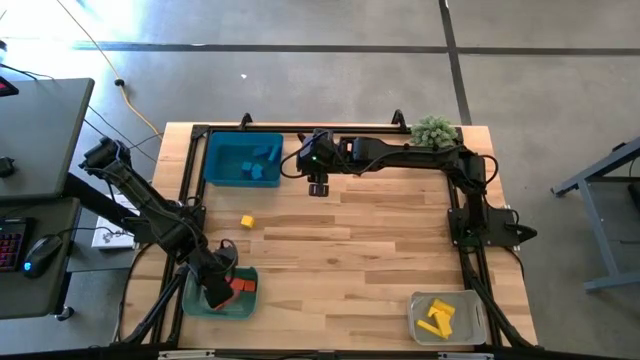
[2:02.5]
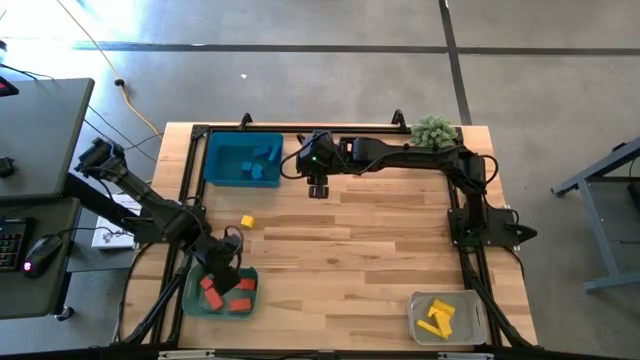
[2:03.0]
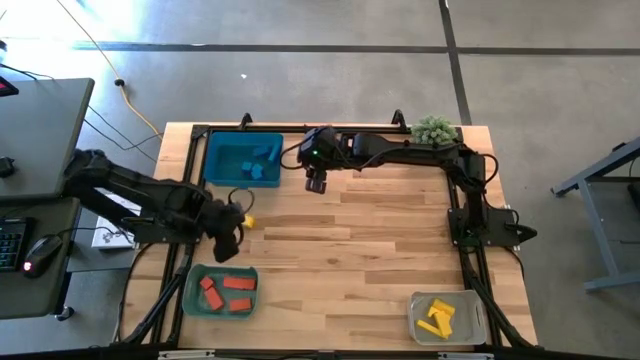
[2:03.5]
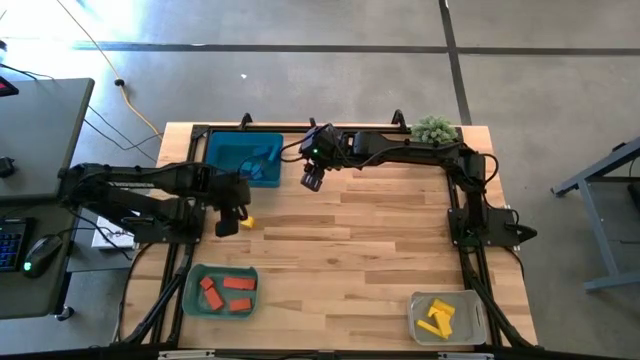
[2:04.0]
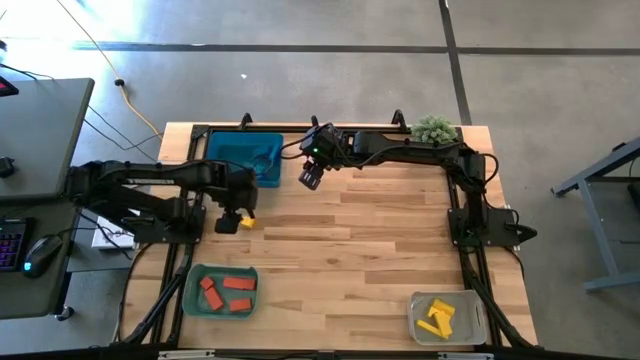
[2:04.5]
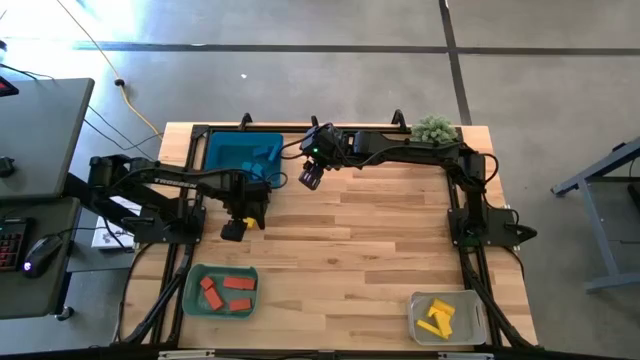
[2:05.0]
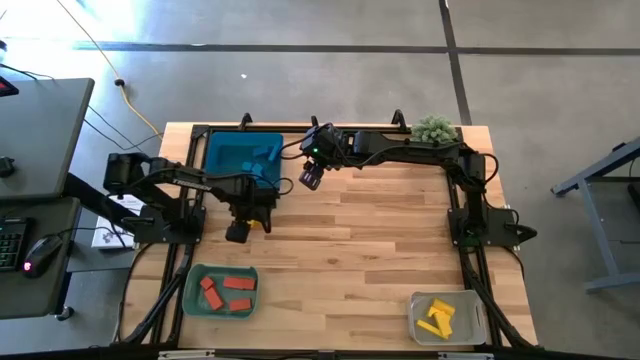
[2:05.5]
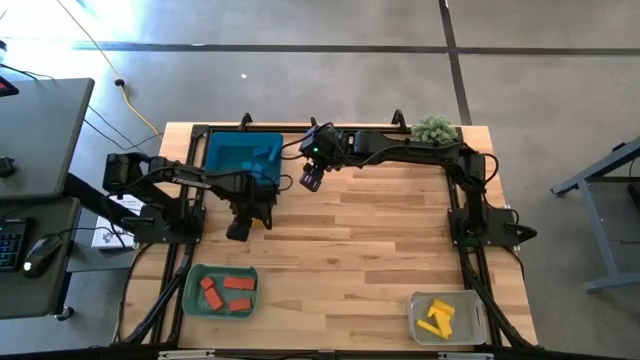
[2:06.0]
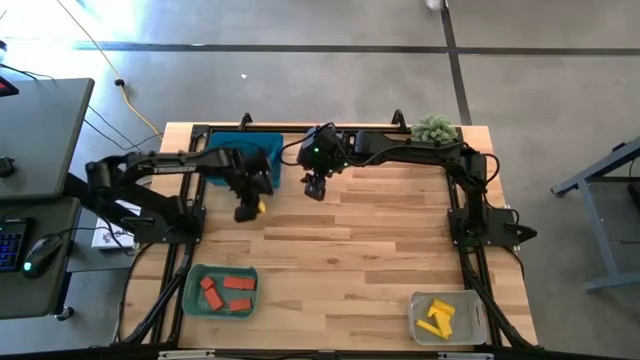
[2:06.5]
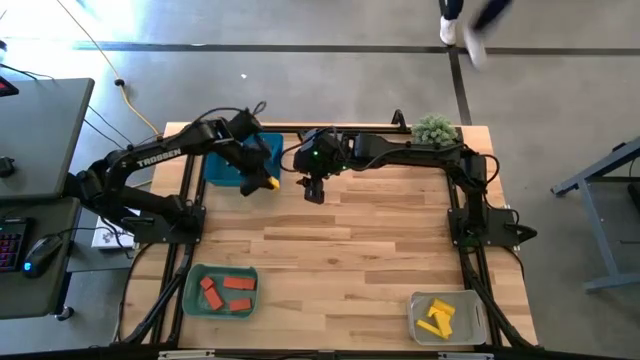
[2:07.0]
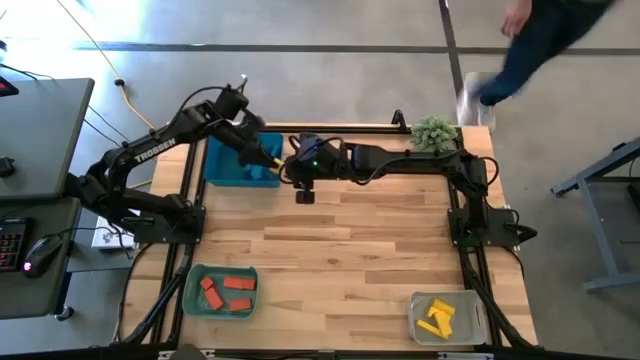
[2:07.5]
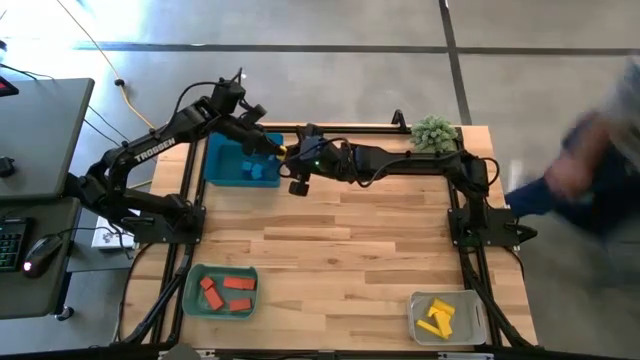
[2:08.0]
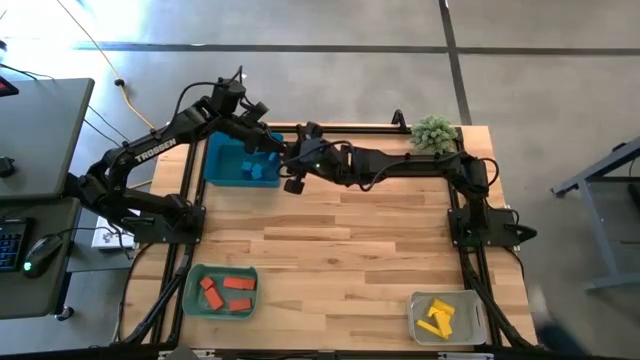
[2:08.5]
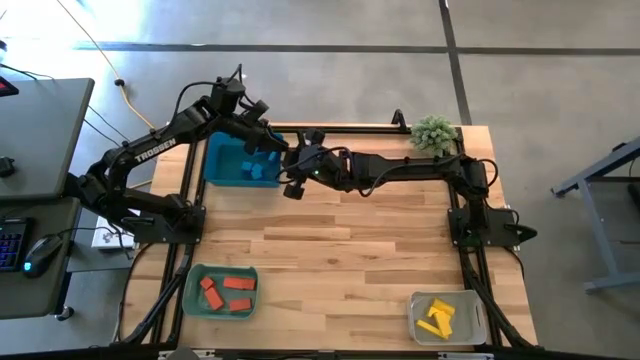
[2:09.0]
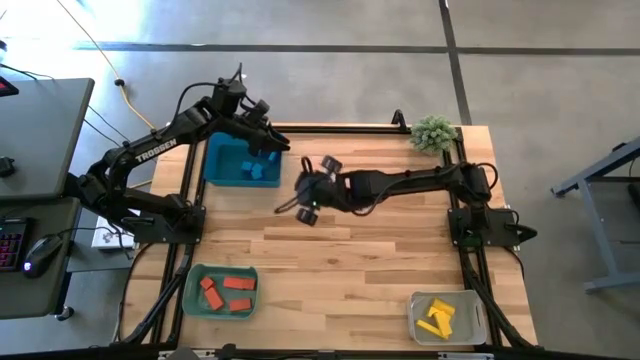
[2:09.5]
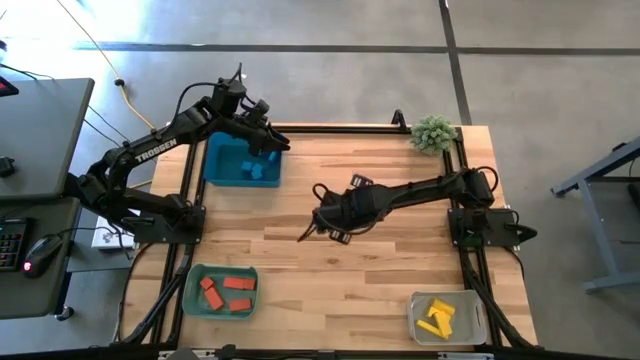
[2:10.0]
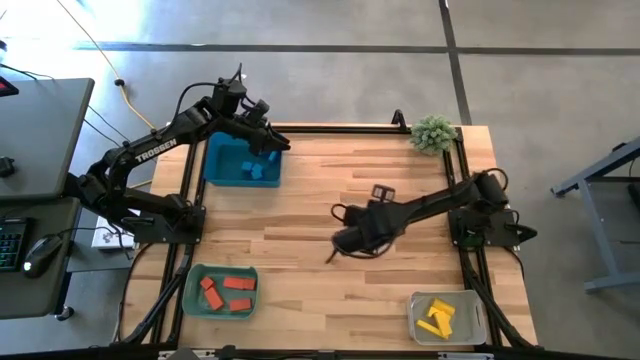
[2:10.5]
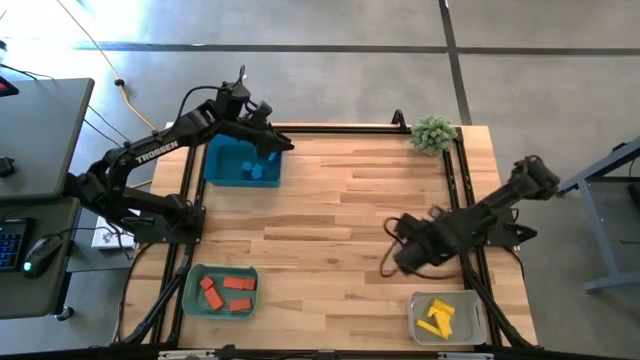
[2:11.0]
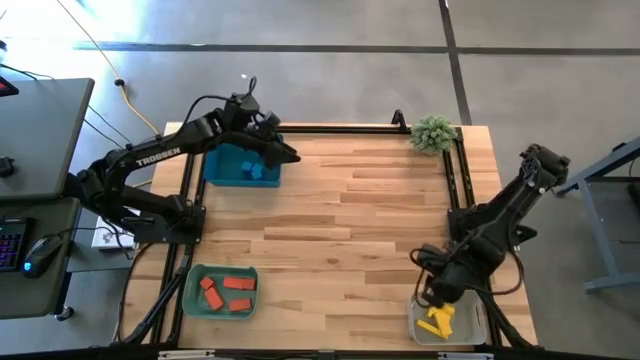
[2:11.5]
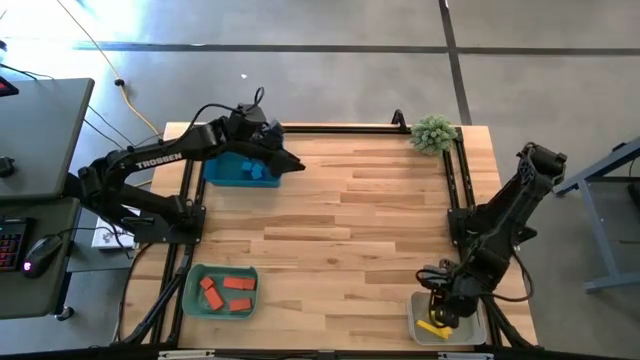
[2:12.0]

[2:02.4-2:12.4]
Task: Sort & place blocks by color
Put the yellow block into the gray bin

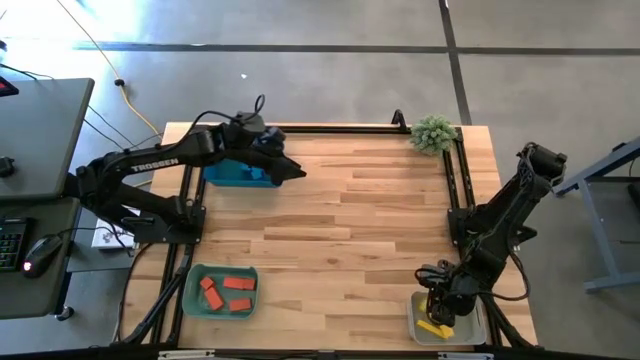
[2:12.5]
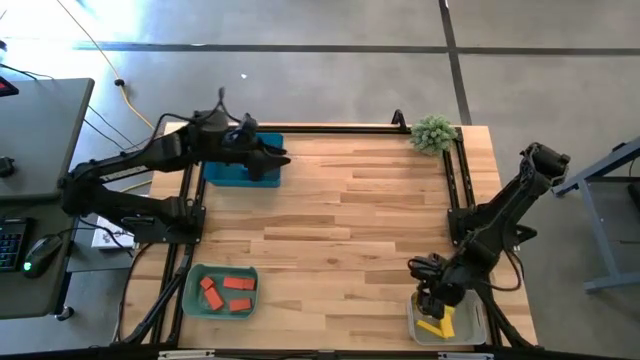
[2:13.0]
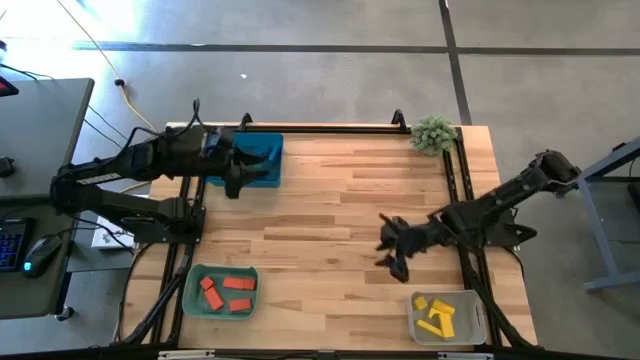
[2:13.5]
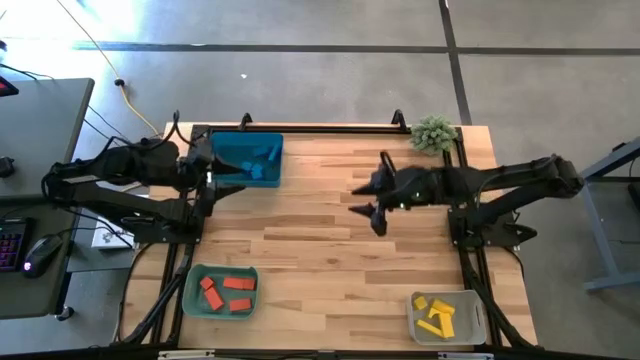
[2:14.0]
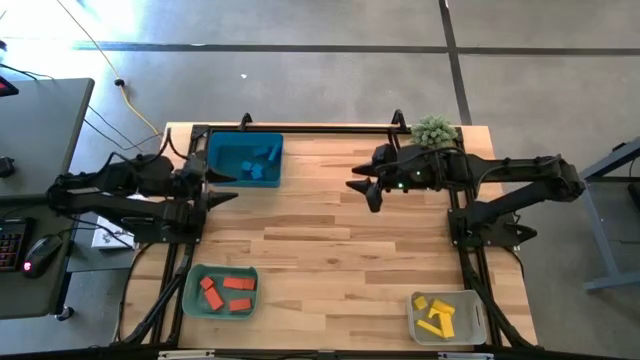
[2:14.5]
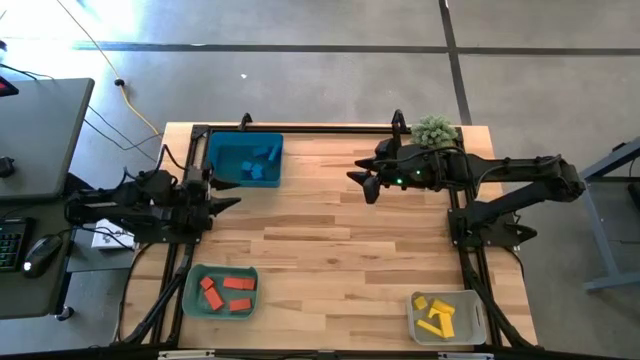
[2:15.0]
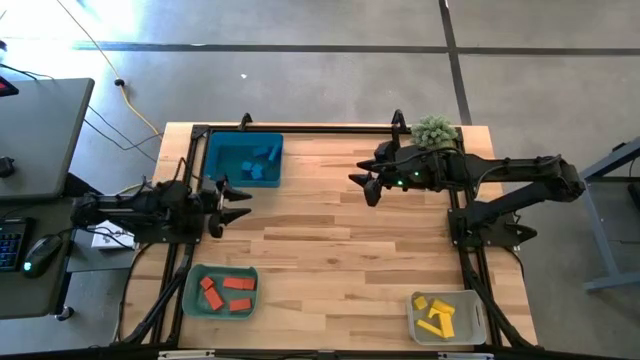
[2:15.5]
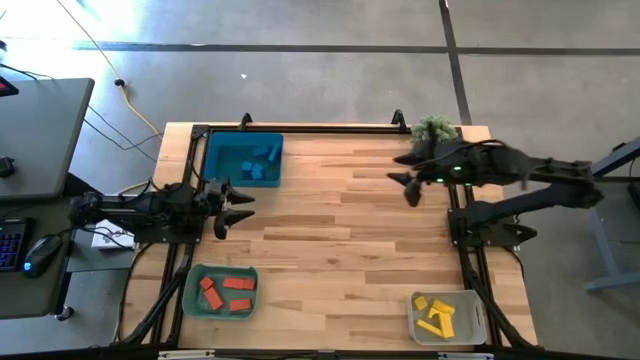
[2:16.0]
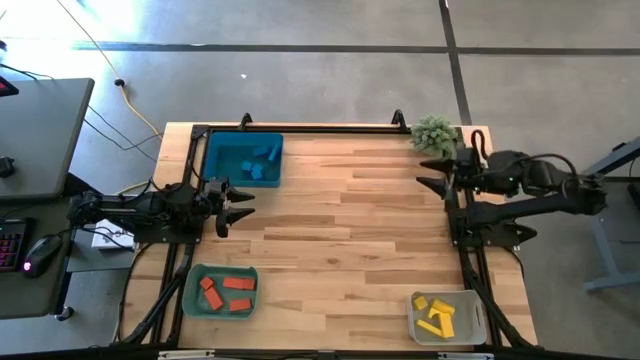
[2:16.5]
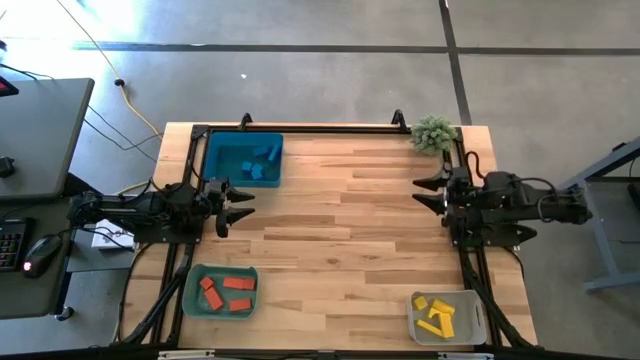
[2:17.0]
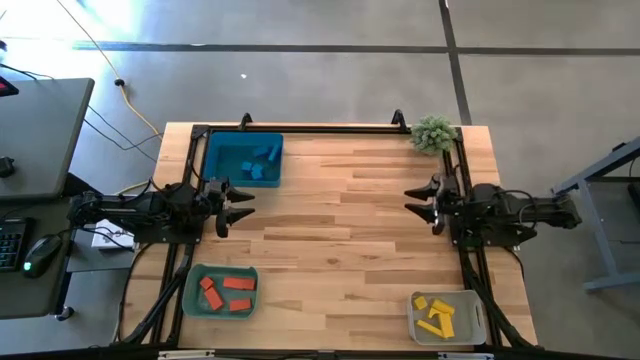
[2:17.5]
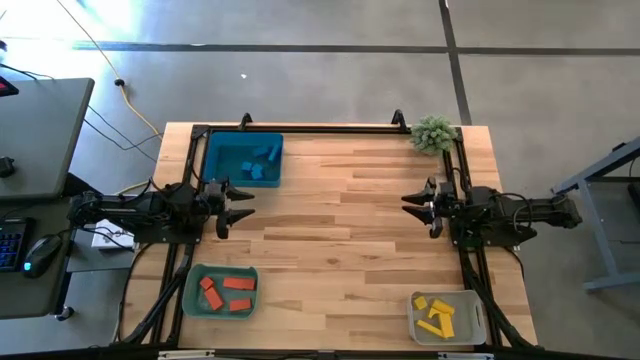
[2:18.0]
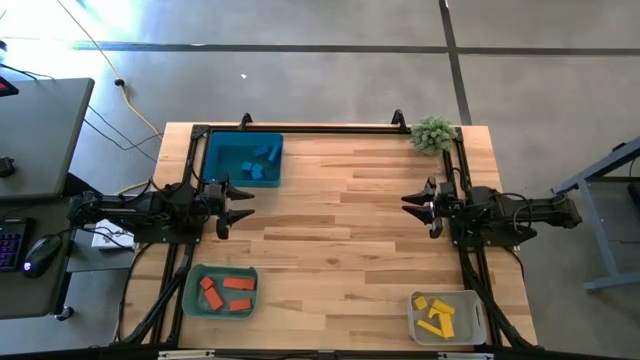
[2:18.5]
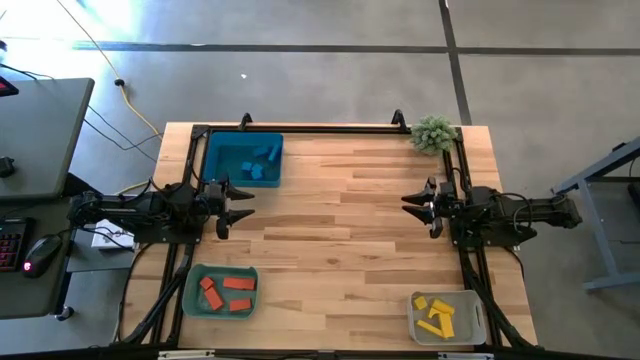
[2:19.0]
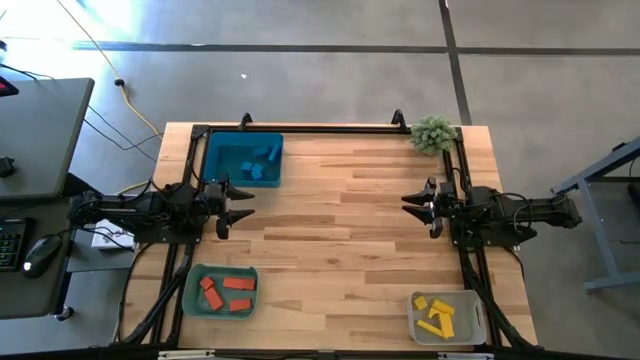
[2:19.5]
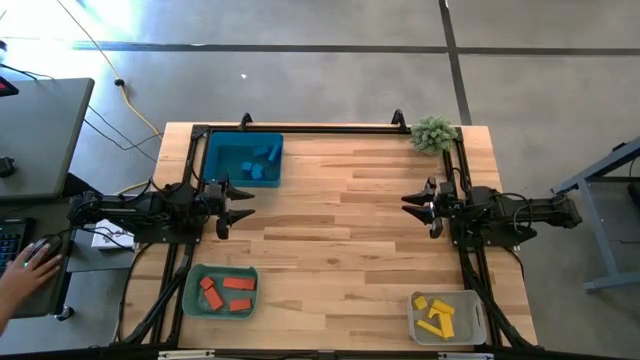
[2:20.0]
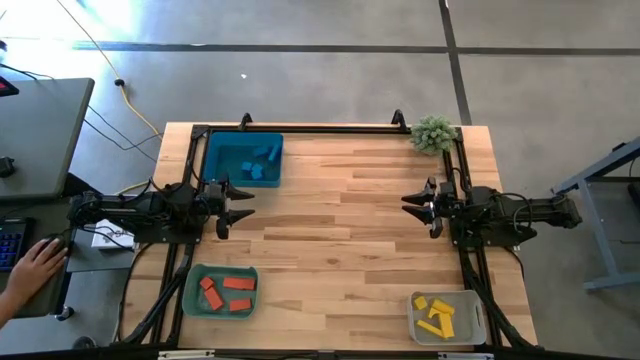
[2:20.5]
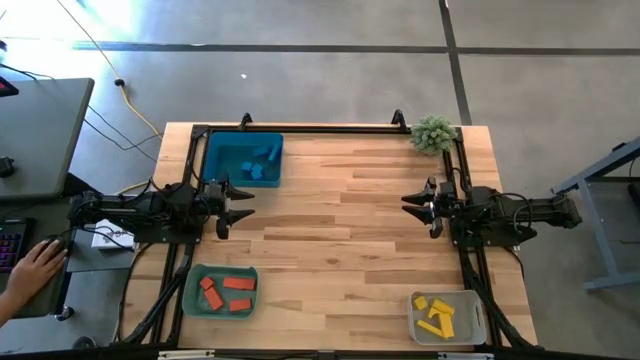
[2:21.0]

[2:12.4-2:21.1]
Return to Home Position
